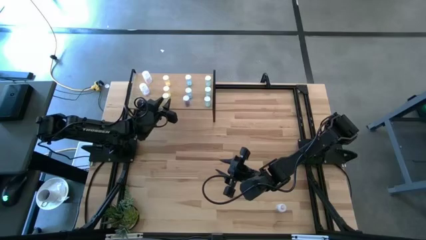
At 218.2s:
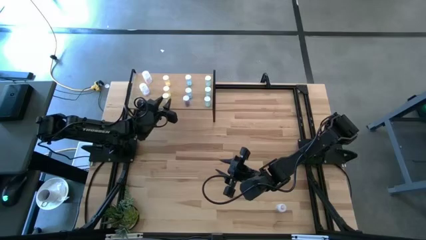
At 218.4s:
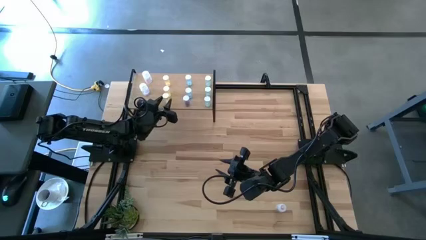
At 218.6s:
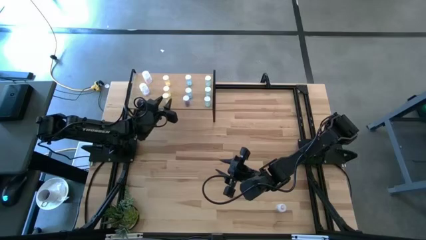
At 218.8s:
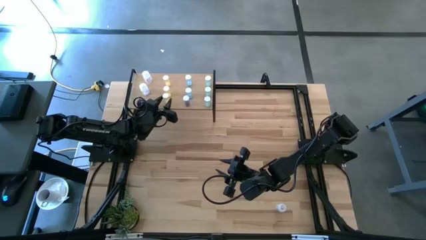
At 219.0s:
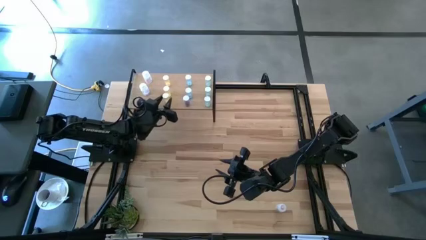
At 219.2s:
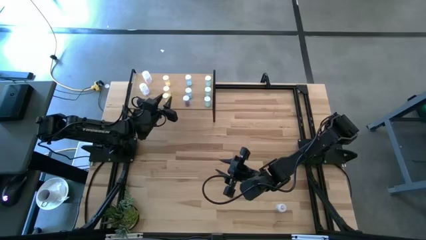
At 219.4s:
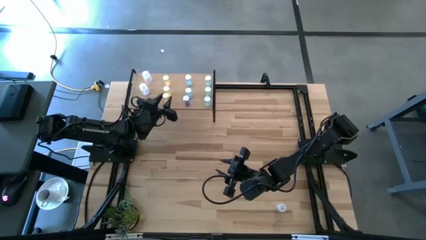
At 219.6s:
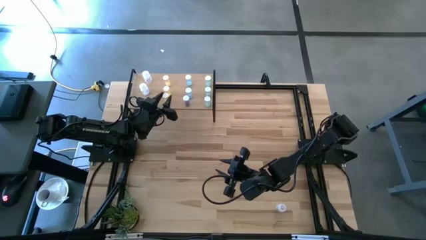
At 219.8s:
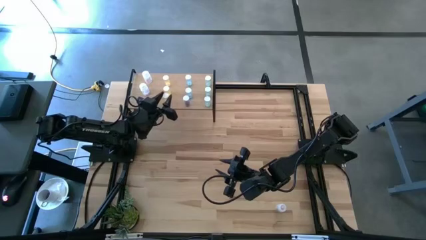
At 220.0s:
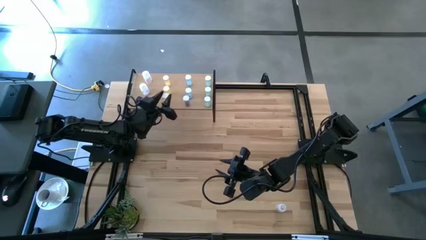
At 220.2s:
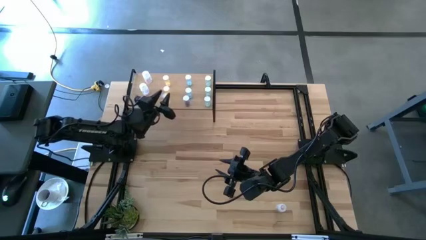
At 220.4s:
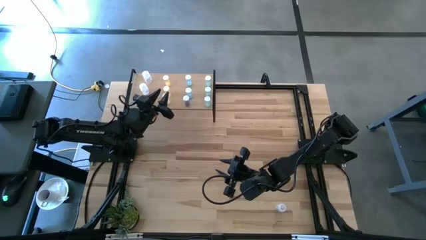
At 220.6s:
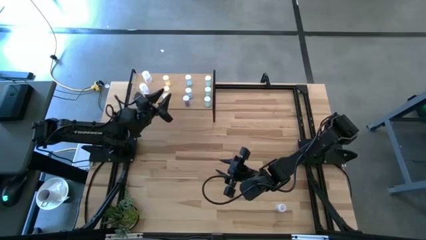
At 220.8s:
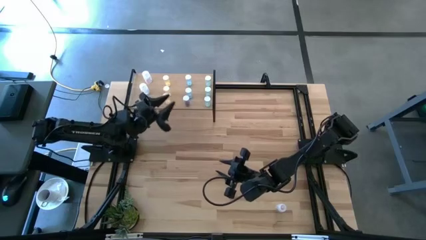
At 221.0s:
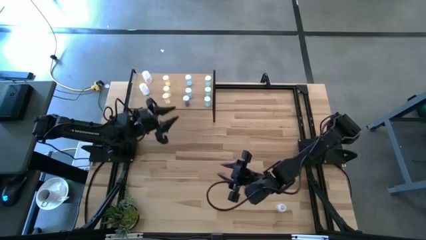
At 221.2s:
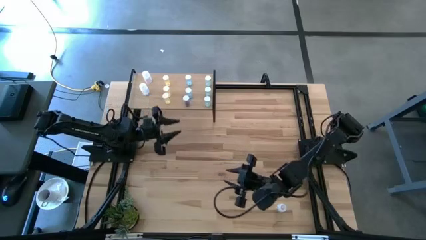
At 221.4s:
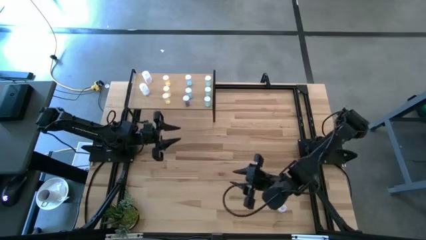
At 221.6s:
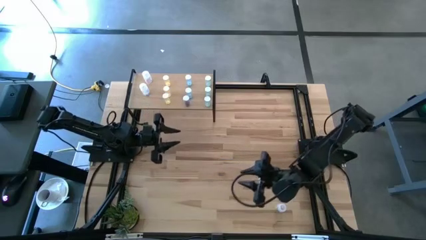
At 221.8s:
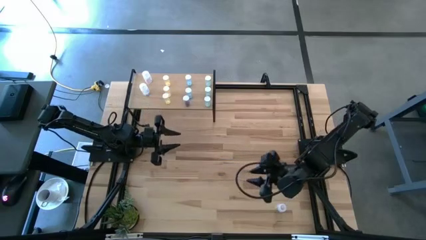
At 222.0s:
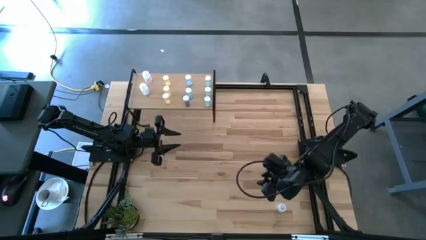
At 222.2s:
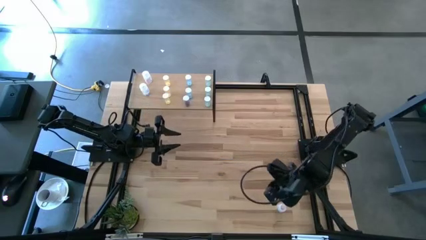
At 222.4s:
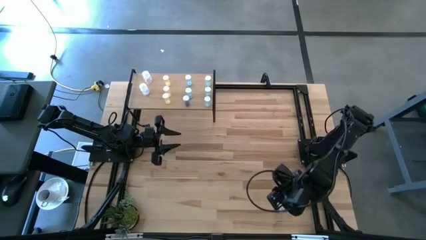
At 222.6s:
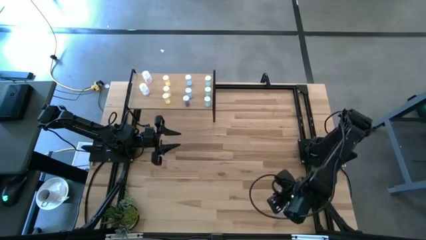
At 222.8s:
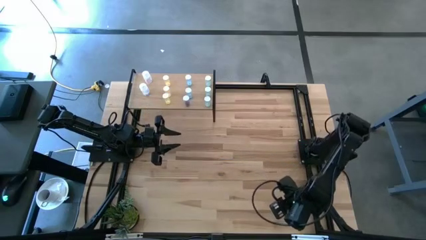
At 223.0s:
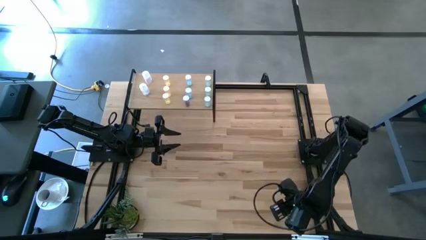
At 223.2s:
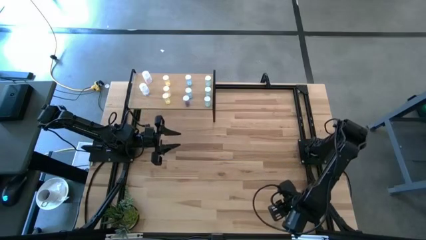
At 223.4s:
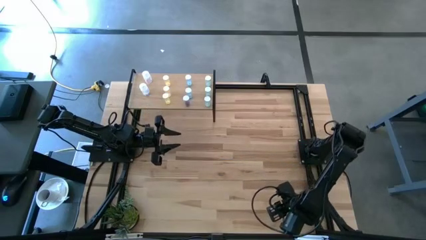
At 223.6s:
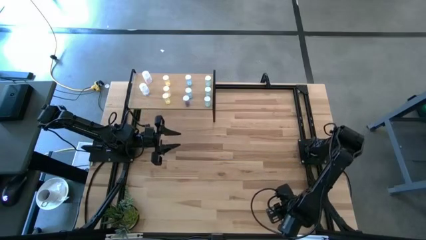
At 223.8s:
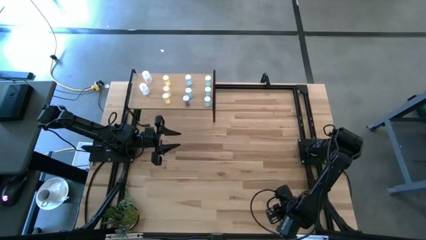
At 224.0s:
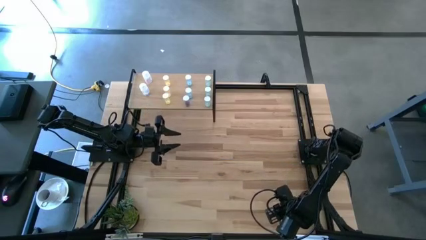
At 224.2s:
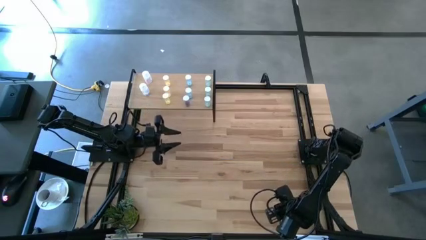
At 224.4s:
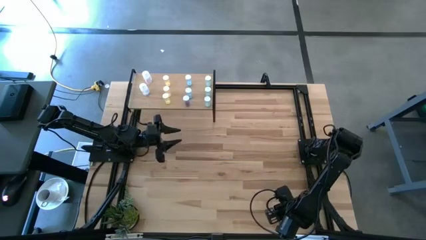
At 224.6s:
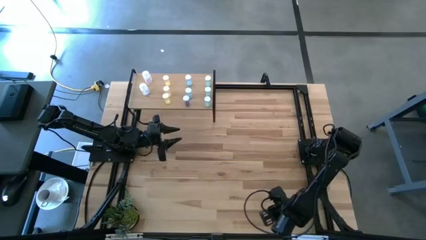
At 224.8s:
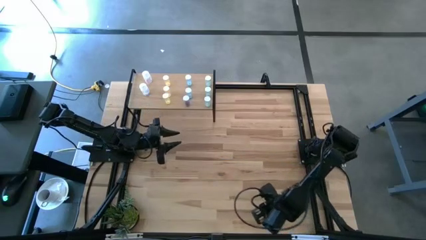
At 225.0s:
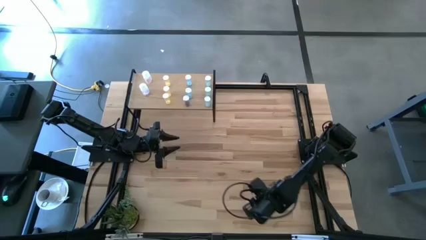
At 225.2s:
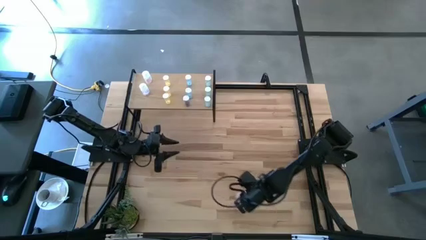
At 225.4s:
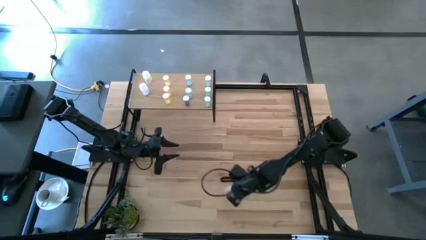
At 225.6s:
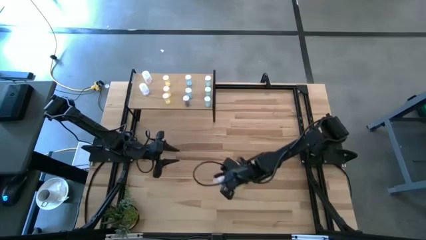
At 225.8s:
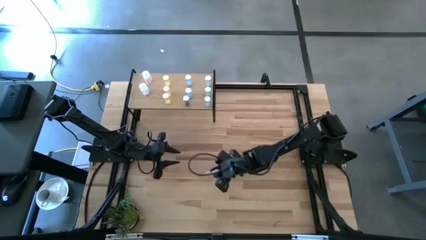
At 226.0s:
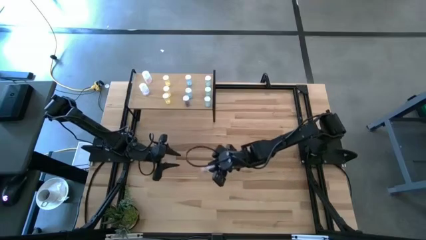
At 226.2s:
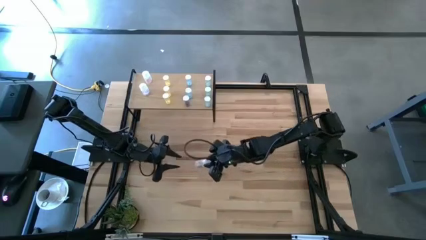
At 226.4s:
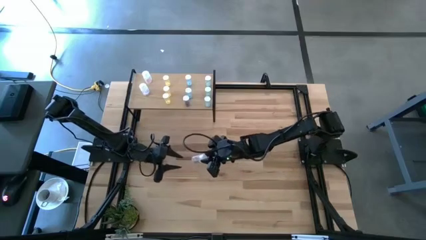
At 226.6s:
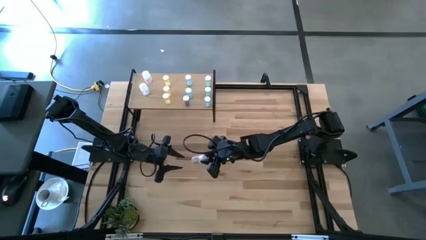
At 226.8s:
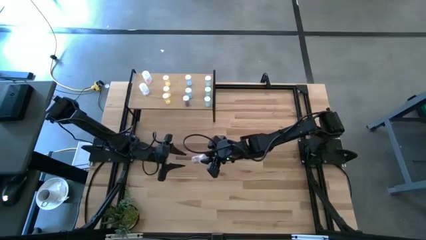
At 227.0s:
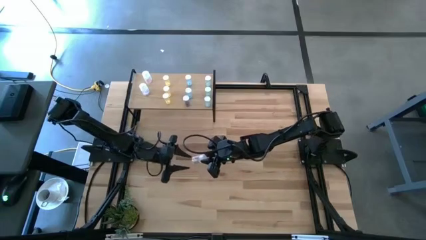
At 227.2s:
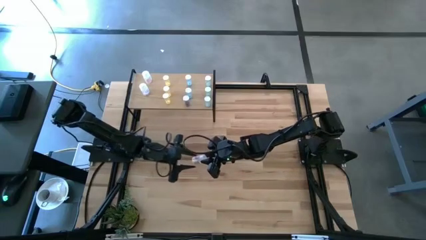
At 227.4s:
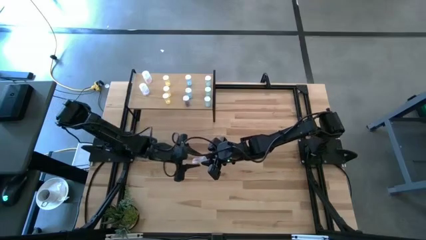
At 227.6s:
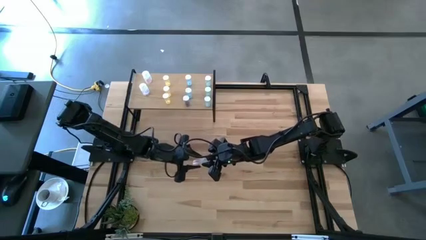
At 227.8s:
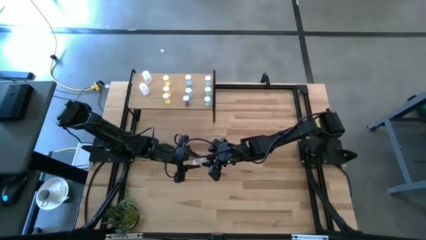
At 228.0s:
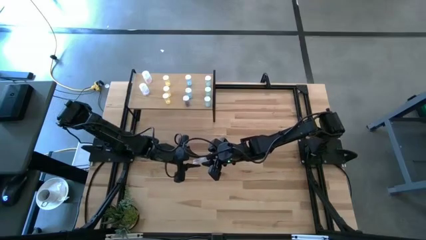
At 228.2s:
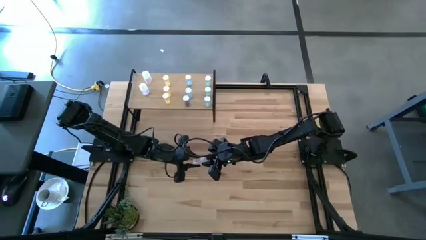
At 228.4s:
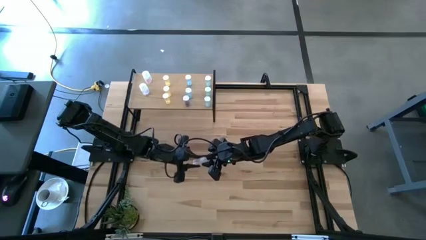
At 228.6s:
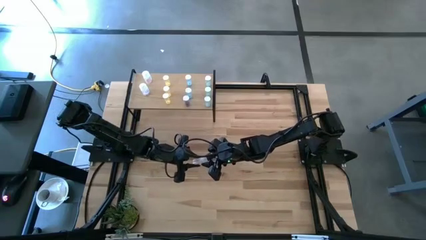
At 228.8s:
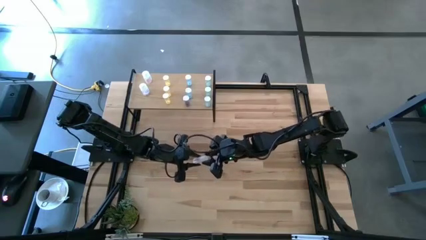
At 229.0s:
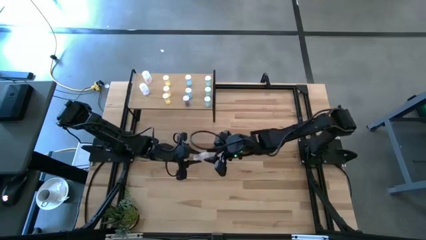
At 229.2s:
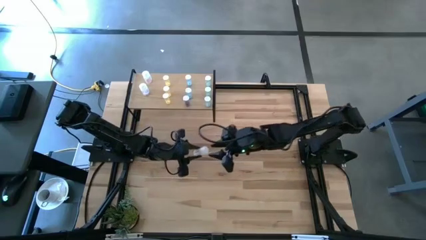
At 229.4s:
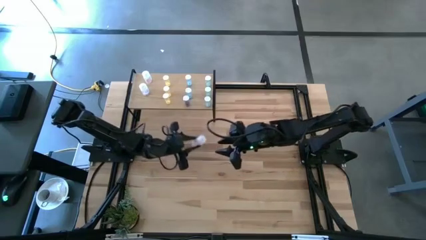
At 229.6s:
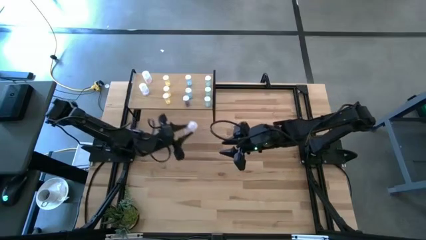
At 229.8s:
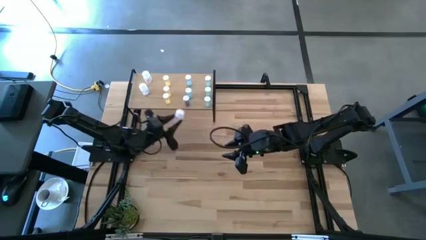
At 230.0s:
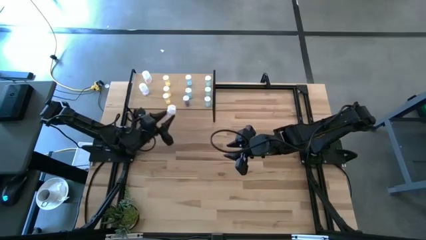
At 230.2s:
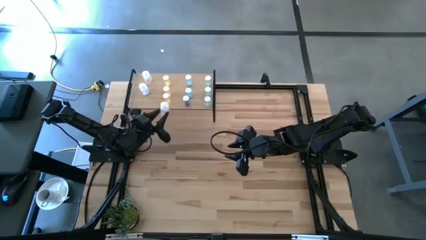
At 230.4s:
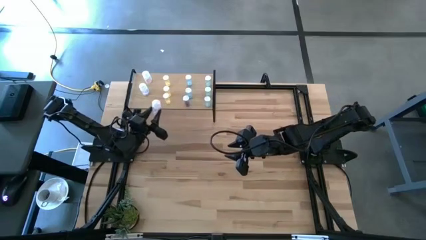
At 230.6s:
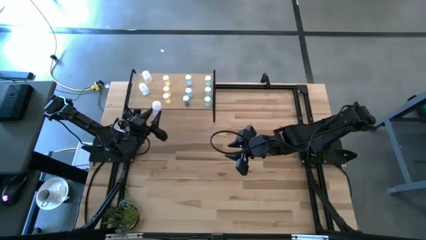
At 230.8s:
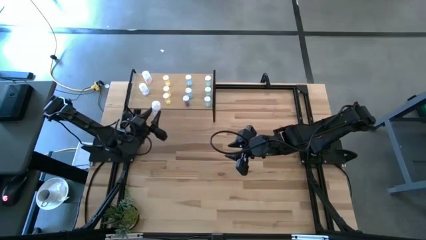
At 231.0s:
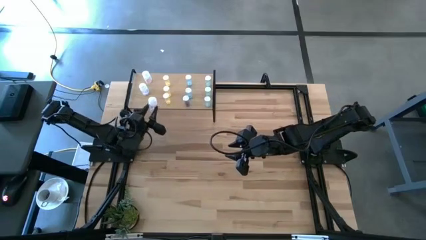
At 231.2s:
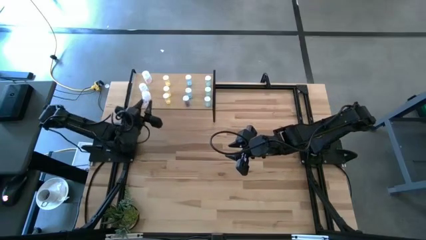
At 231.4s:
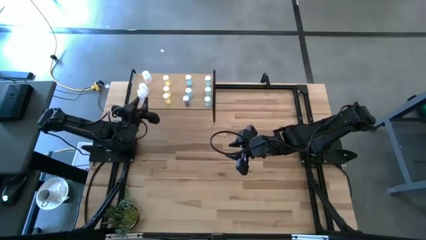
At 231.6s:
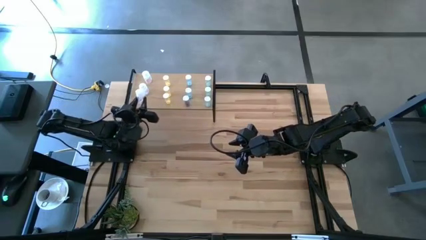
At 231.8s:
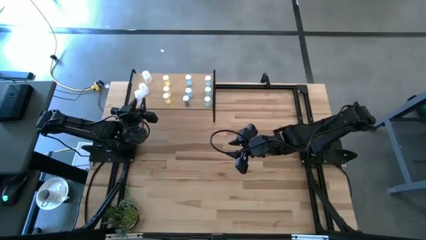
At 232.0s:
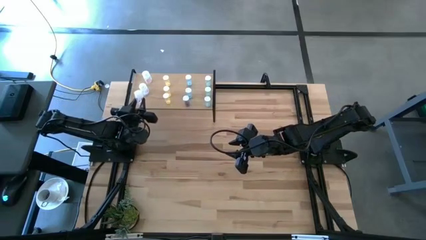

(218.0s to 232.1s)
Task: Pick and place medicine bottles onto shelf by color
Put the white pill bottle on the shelf aligned with the other white pill bottles
